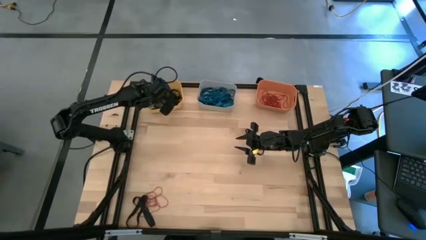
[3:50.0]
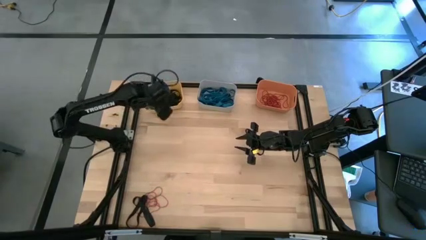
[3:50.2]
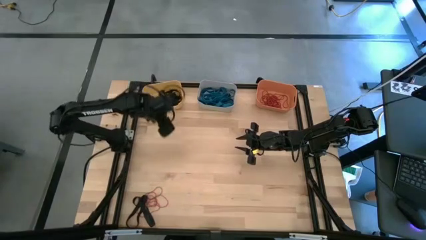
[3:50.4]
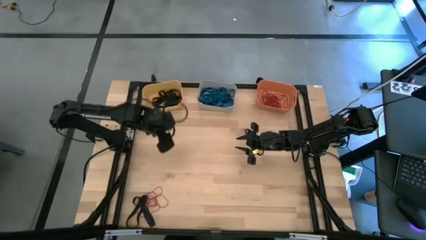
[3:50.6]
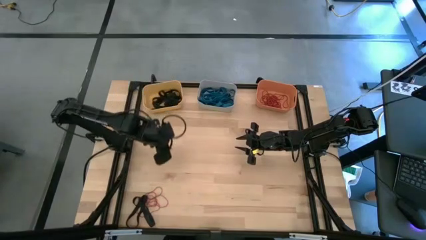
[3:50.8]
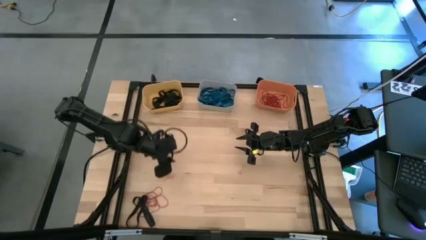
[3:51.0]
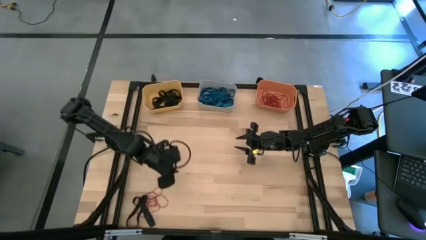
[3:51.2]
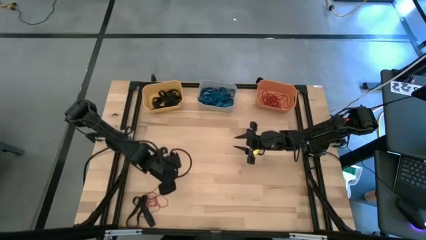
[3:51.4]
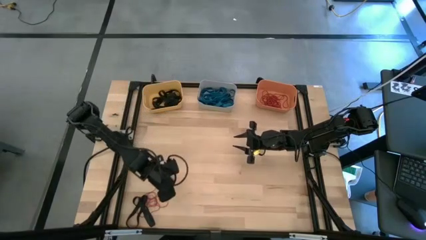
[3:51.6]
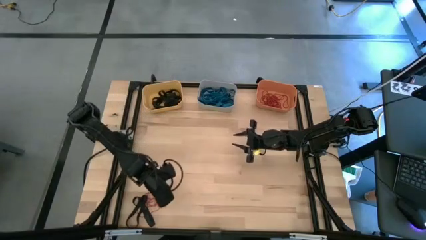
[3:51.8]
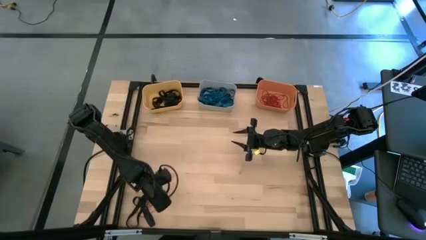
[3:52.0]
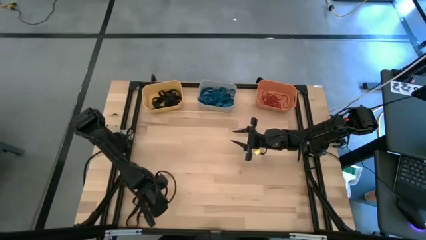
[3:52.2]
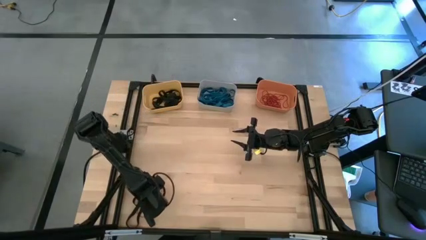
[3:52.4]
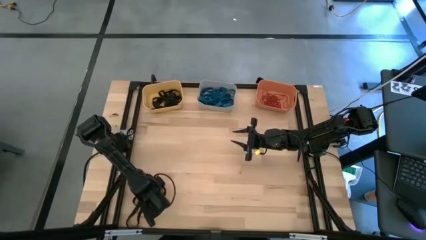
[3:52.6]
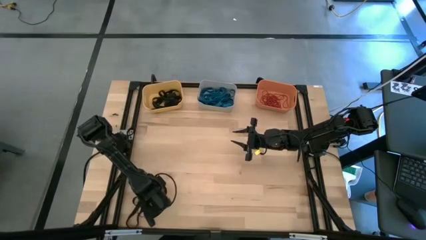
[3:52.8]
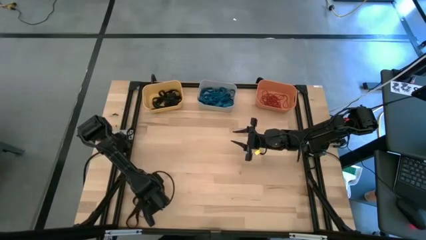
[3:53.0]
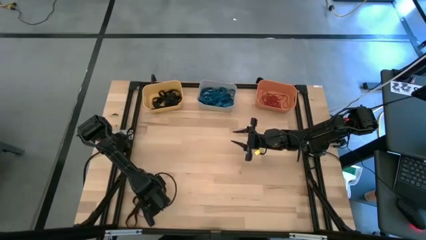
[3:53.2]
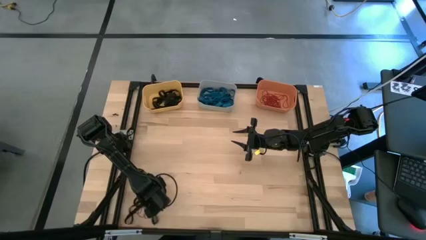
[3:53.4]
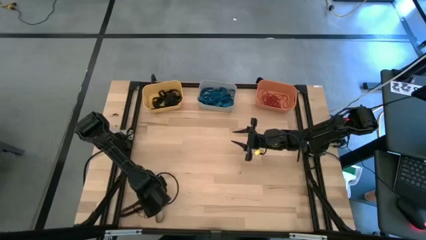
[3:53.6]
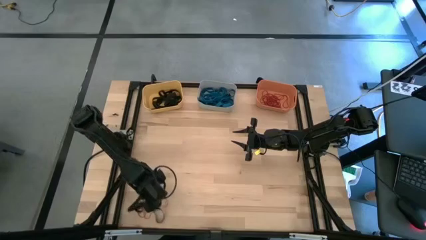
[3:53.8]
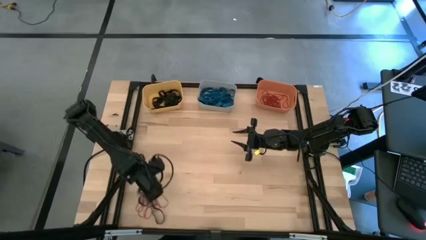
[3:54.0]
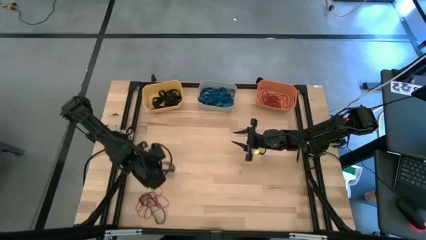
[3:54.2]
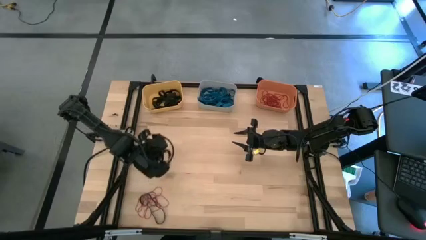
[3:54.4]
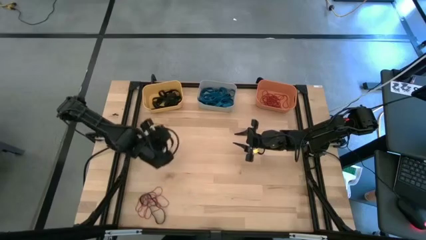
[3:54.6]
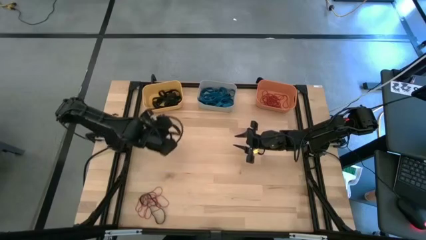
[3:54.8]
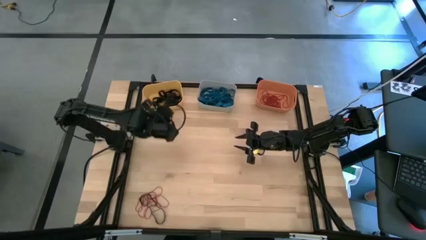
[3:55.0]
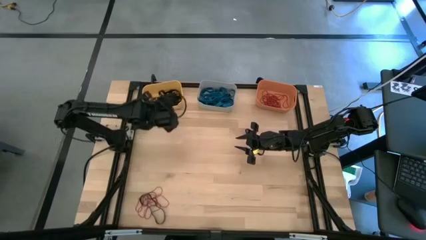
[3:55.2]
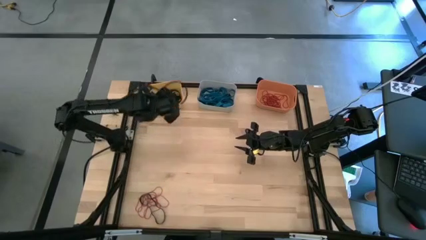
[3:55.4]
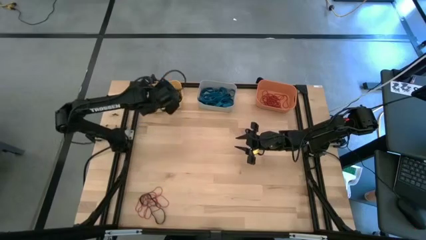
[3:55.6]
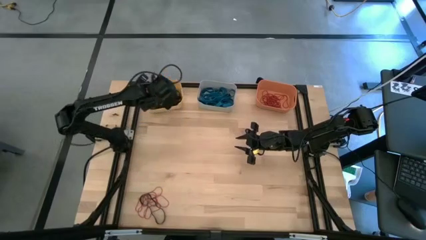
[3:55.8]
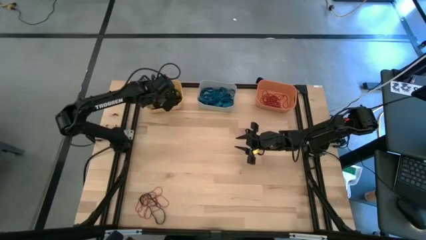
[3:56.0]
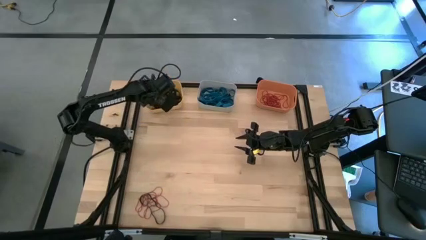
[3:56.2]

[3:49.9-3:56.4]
Task: Sort rubber bands into baskets
Put the black rubber band into the yellow bin

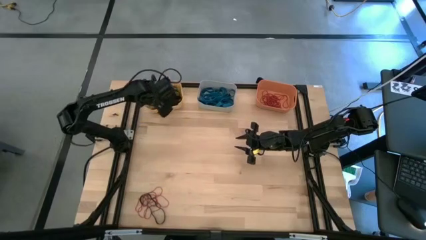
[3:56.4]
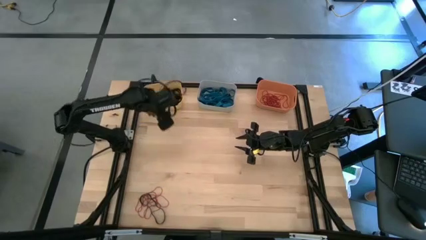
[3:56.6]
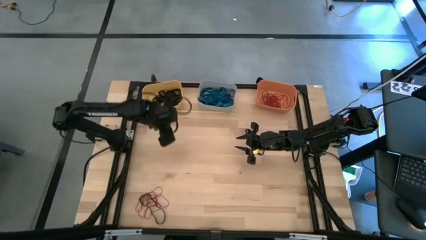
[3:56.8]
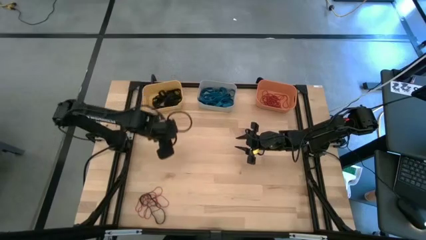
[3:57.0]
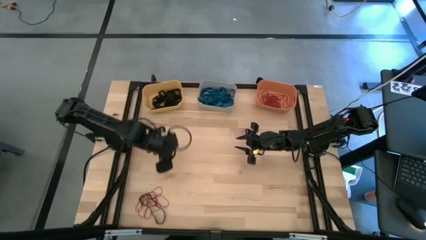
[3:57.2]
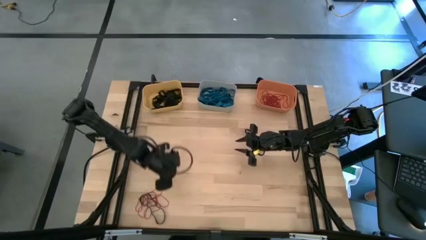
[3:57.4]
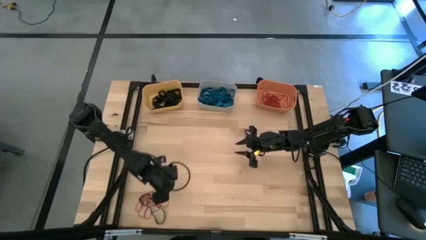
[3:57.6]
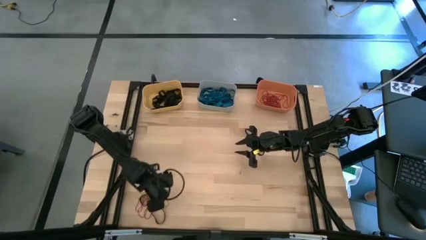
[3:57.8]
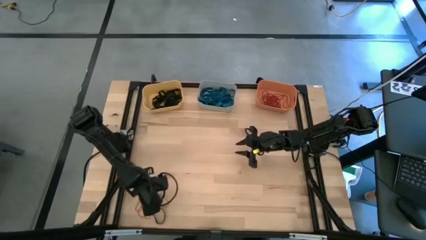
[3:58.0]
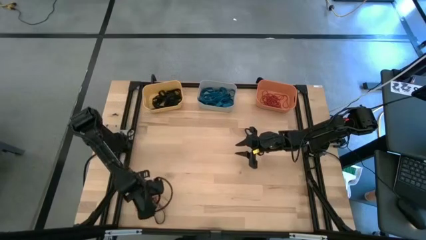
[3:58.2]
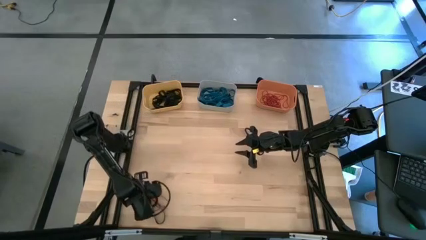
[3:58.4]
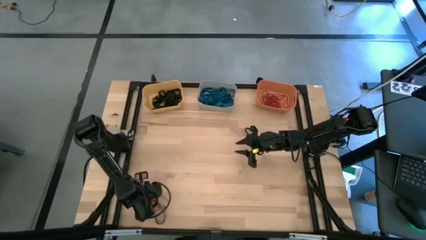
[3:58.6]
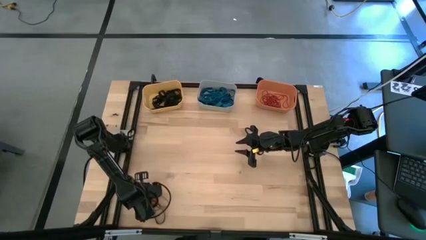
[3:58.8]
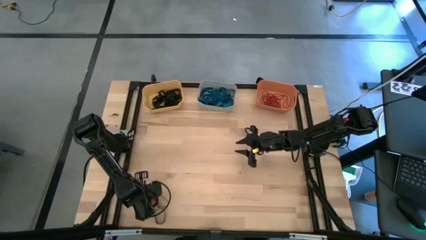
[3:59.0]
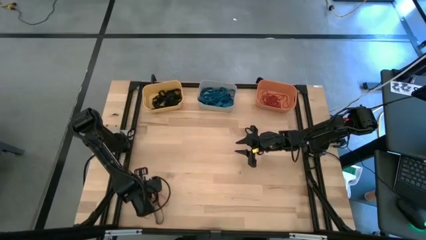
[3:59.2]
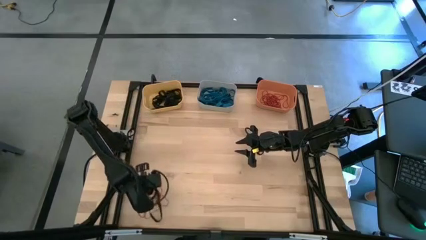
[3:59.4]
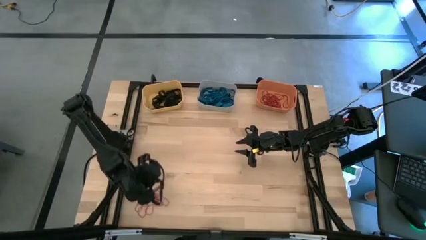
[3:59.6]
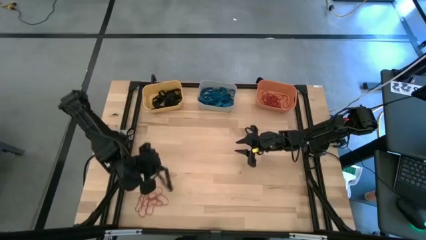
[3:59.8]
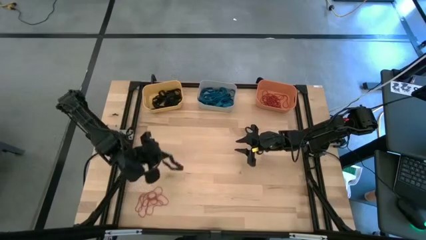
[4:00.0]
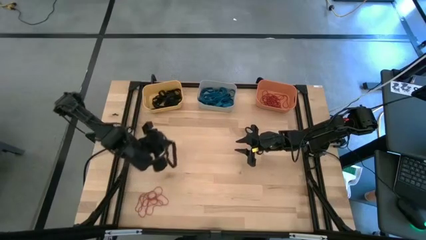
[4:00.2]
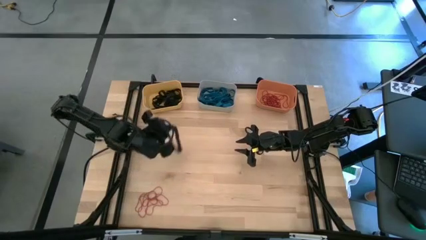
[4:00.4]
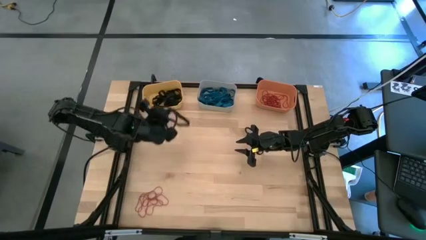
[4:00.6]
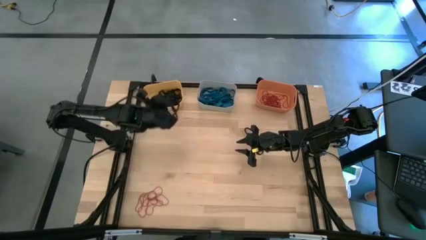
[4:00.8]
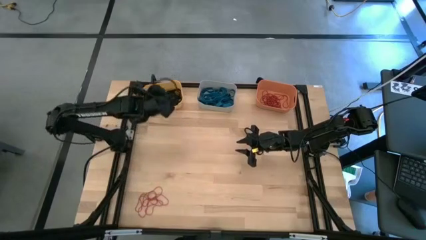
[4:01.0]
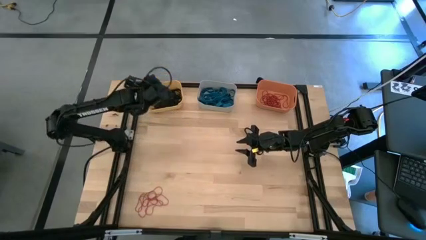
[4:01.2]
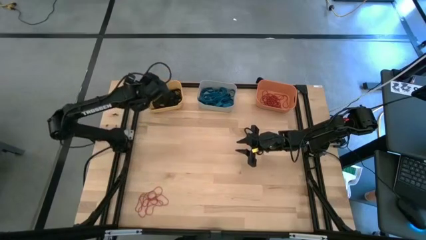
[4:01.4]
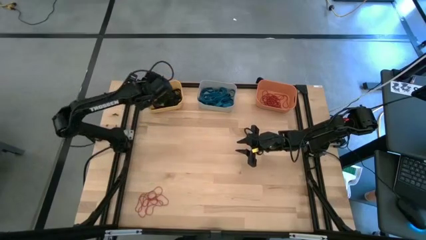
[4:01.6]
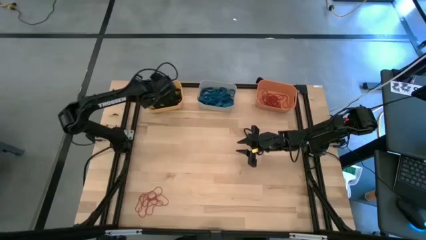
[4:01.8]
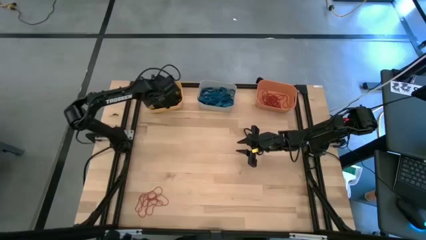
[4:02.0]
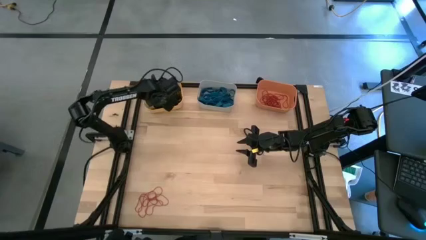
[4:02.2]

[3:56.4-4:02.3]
Put the black rubber band into the yellow bin

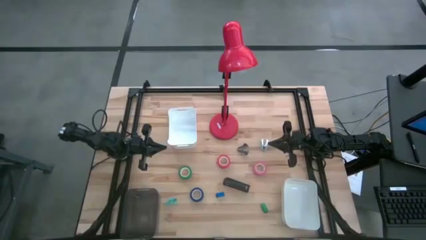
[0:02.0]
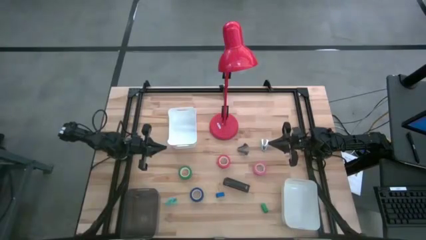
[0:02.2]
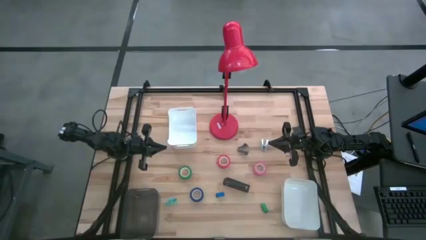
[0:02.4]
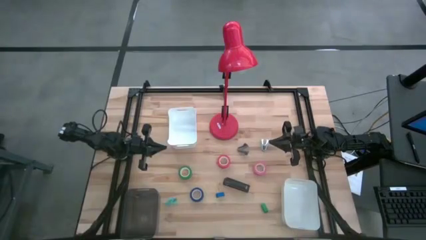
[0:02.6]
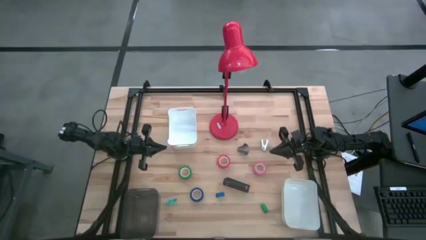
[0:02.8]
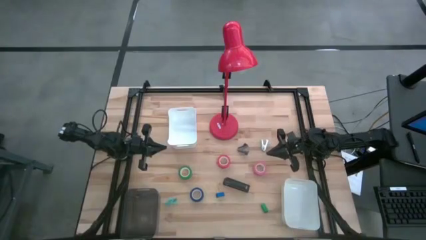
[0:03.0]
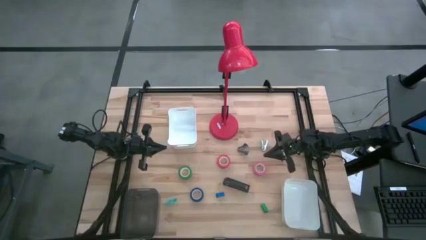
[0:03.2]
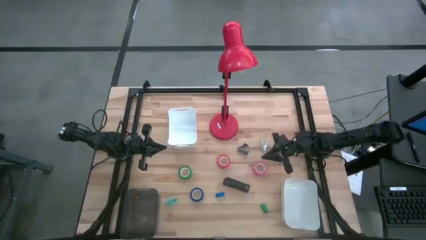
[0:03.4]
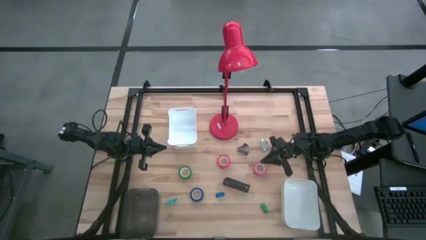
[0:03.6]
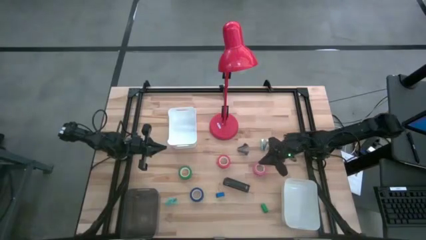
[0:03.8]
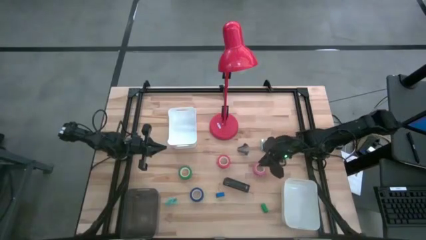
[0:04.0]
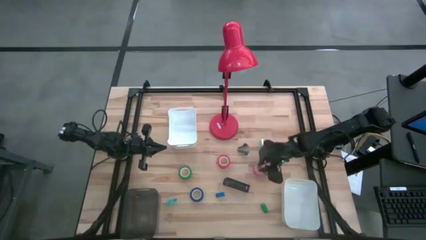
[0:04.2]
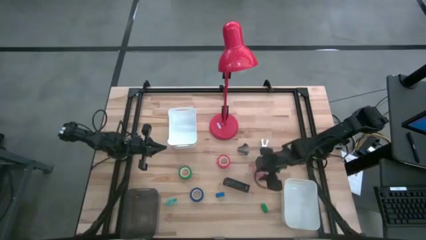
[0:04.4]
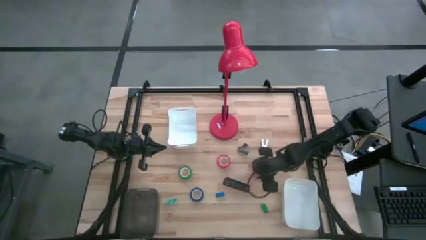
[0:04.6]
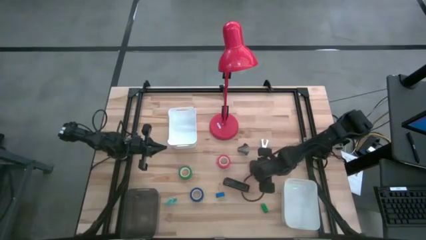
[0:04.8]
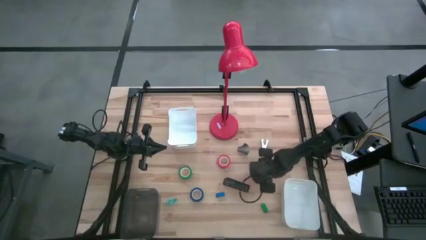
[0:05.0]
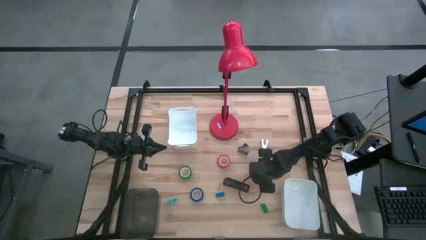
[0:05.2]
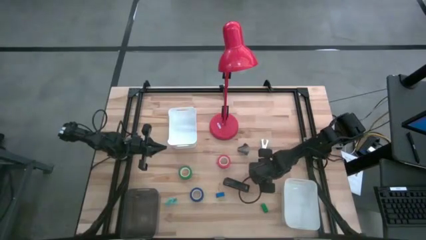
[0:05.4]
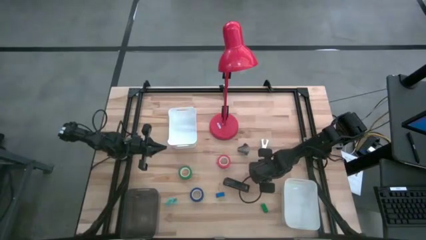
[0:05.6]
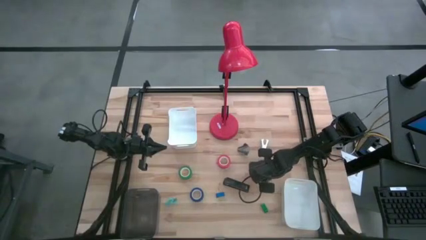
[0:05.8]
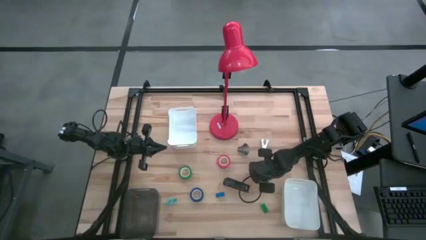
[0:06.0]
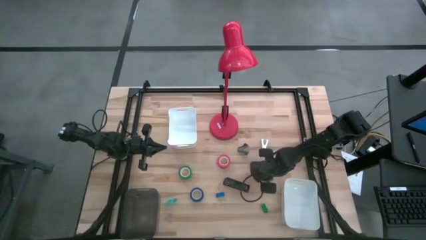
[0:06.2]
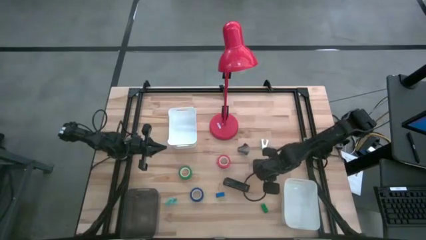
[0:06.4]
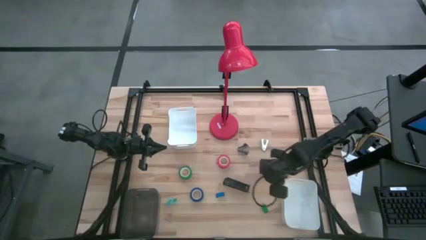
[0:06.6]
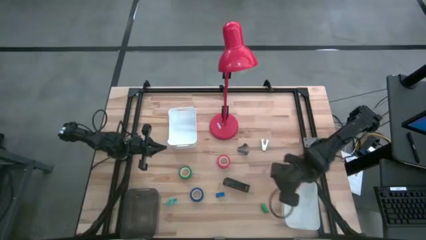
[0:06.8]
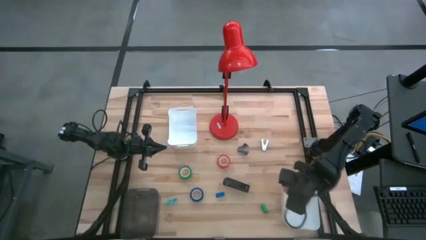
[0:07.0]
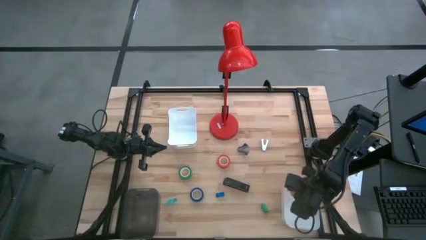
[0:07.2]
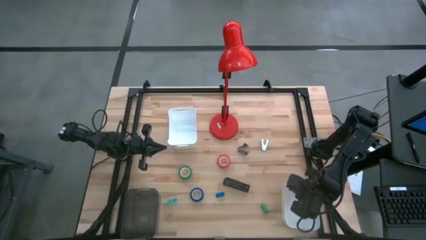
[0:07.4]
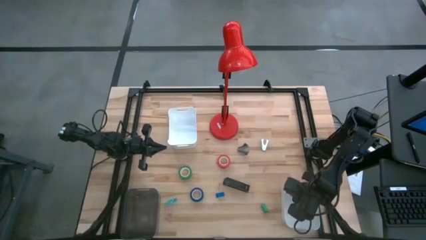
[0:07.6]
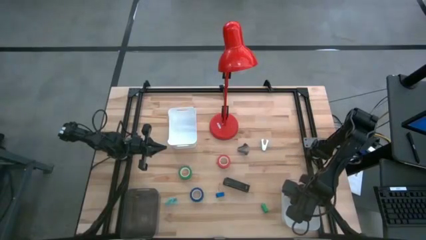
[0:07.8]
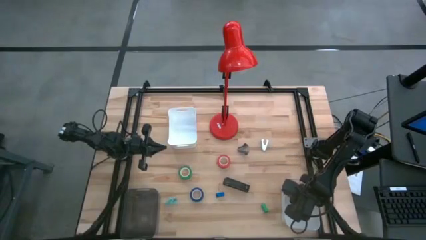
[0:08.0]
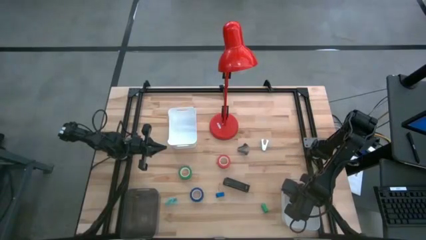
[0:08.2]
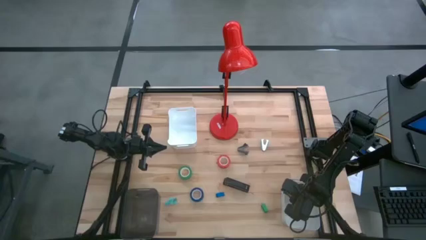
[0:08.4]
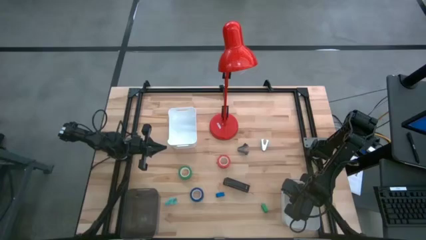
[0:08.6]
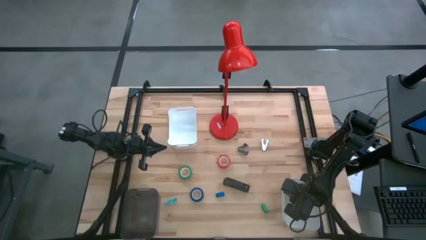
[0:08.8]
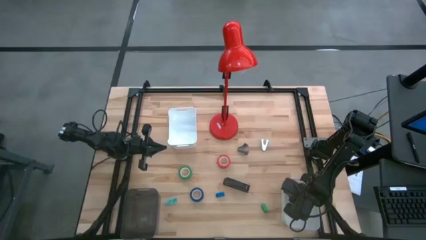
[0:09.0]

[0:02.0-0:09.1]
Task: Pick and place Stapler, Stapler remover, tape
Put the pink tape into the bottom white bin
